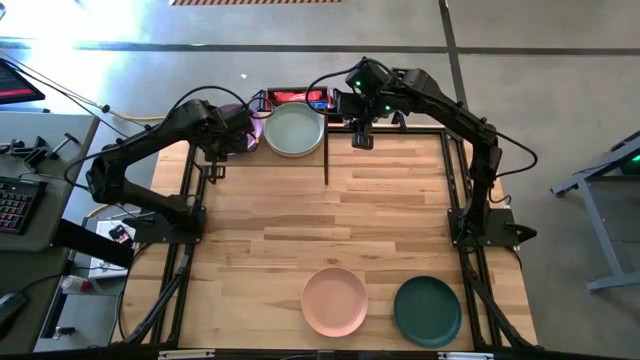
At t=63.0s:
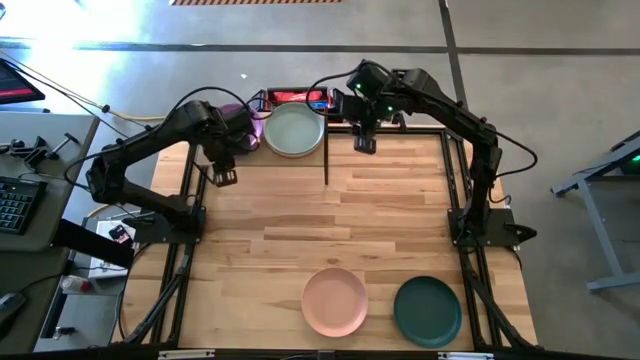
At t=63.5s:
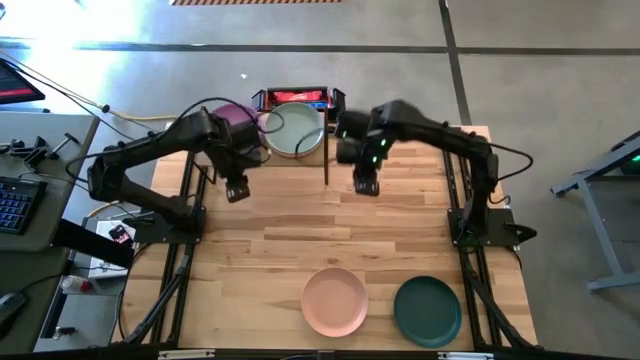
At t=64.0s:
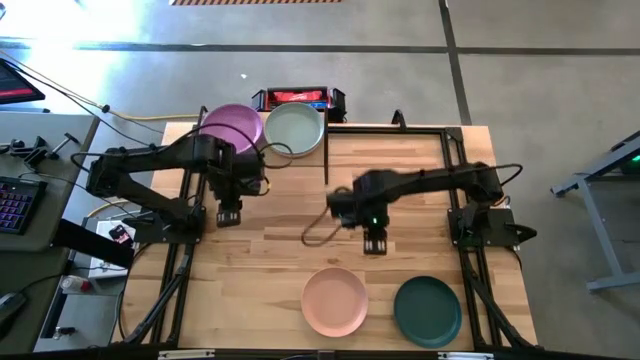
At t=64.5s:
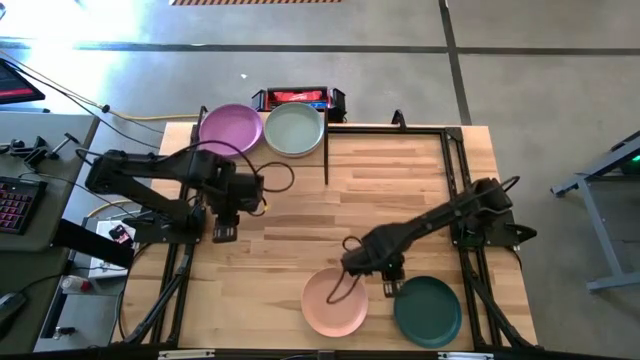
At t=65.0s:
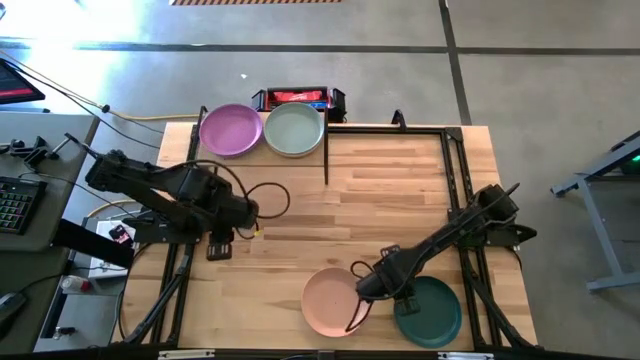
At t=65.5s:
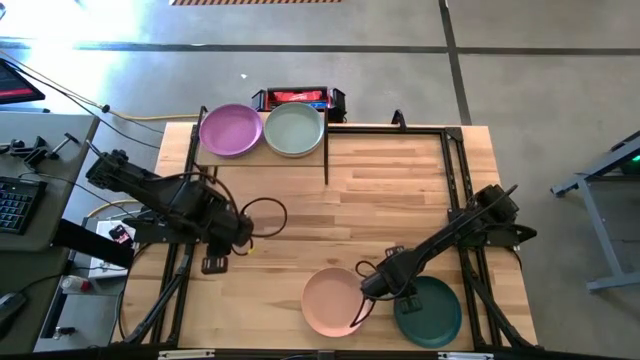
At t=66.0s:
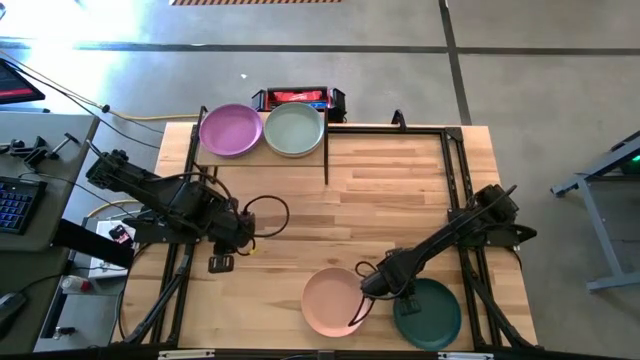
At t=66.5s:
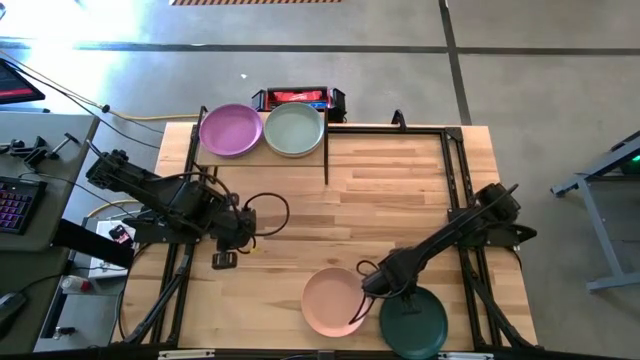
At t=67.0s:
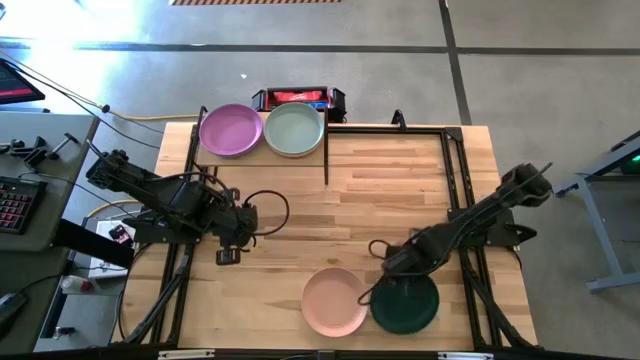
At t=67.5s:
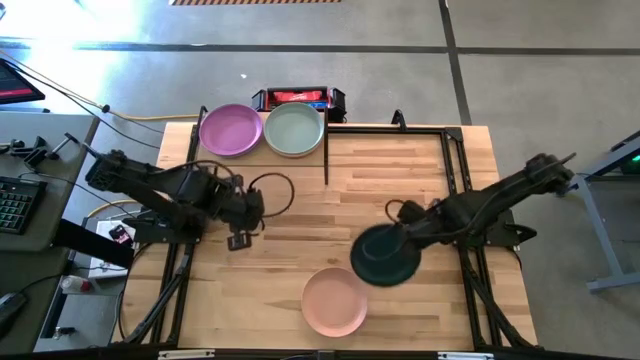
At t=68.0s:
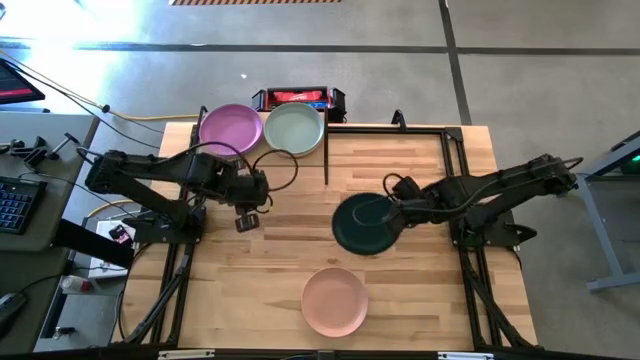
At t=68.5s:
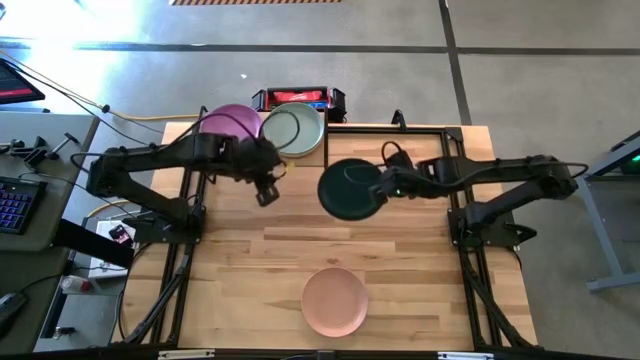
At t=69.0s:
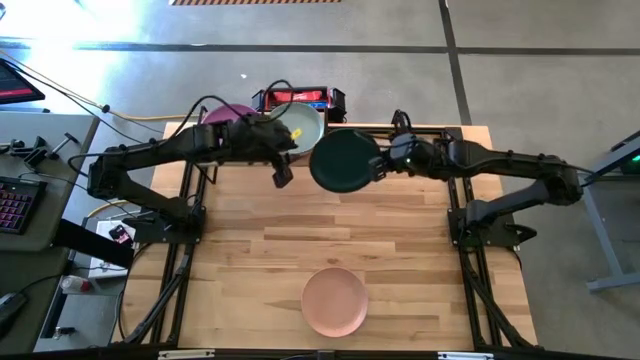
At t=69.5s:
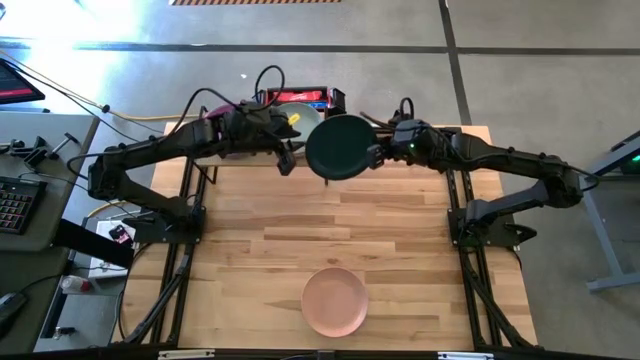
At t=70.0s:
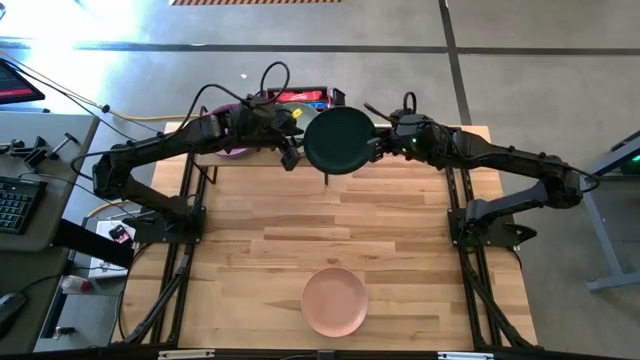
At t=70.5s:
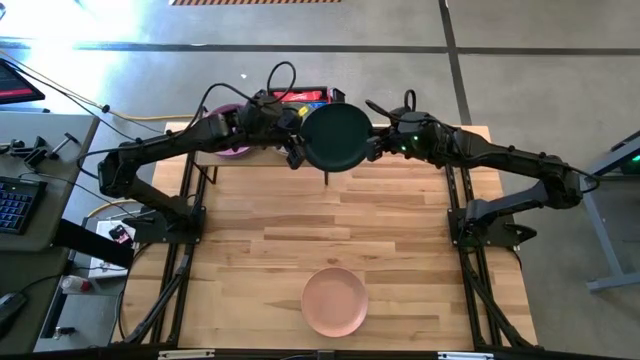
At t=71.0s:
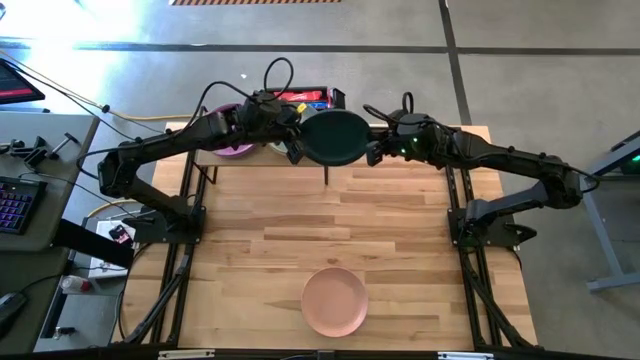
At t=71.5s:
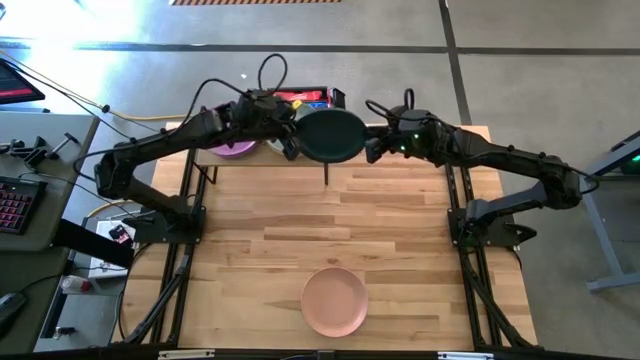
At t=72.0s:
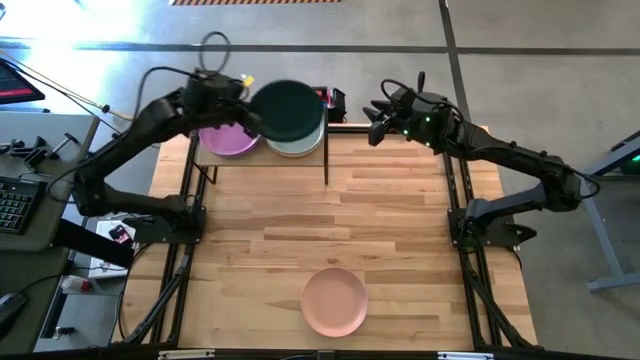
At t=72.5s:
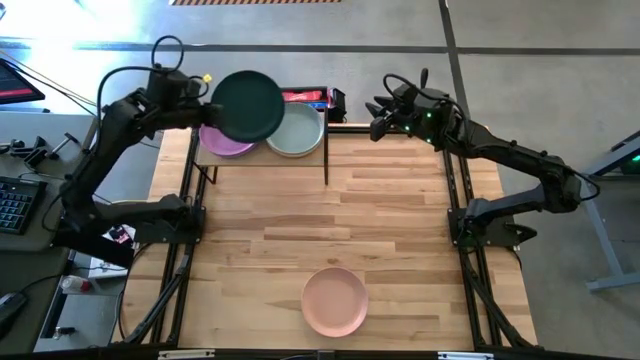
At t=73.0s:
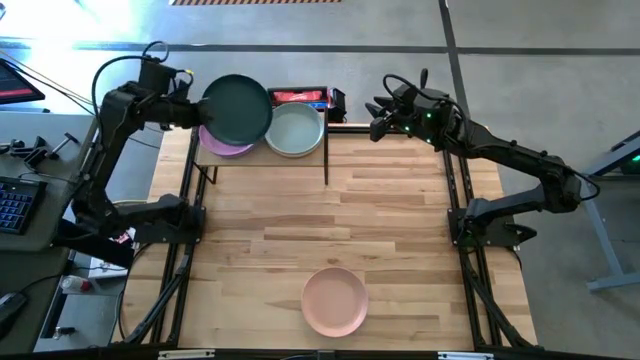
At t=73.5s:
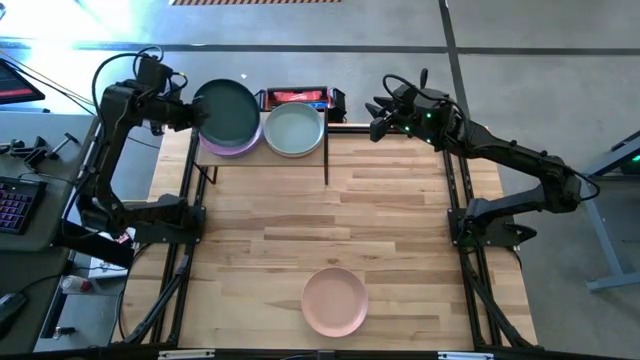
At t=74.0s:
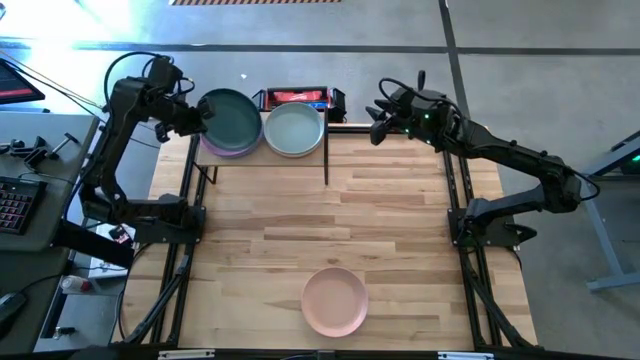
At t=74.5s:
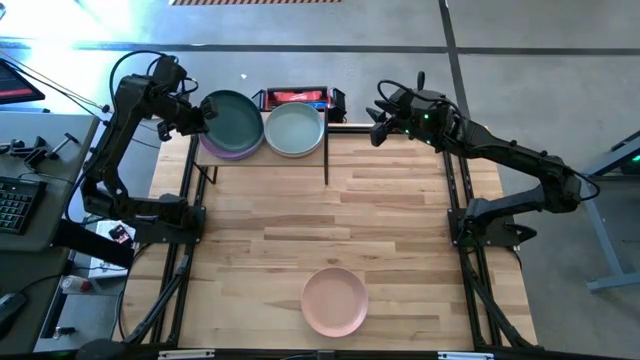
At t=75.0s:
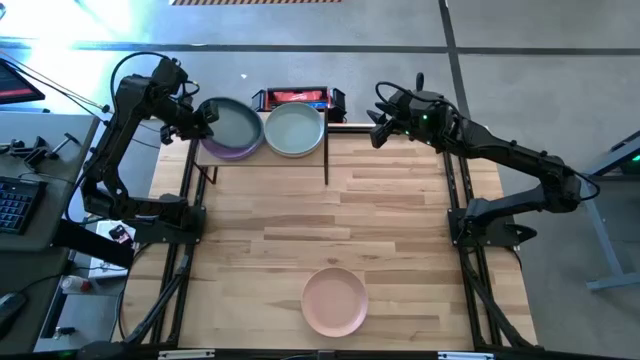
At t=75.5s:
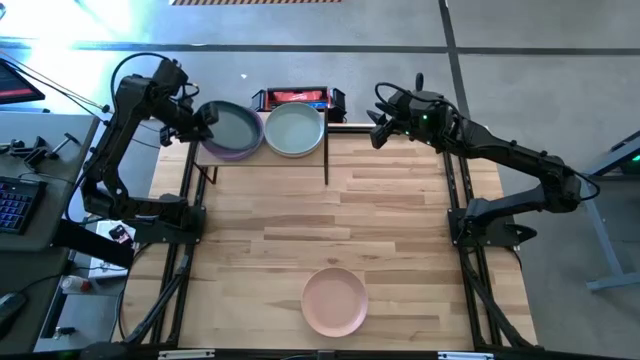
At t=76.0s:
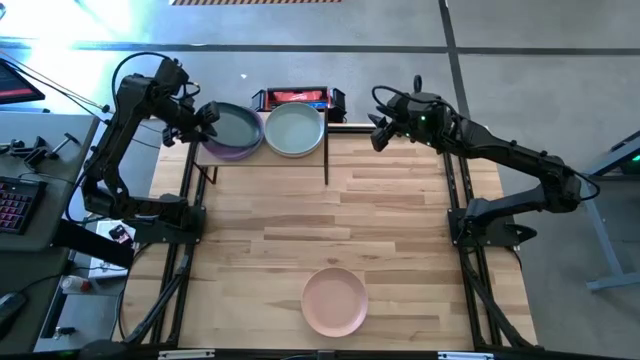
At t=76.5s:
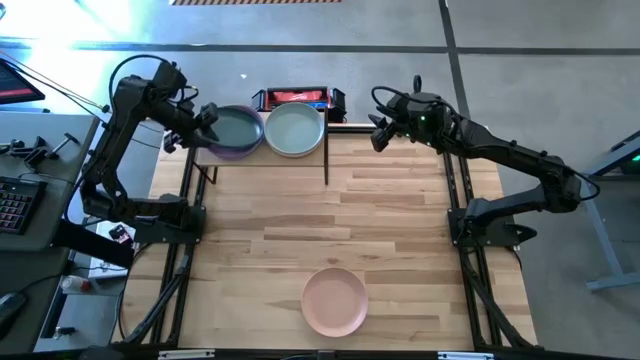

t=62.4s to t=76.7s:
Task: Place and stack plates onto a shelf
Stack the dark green plate on top of the violet plate on the shelf

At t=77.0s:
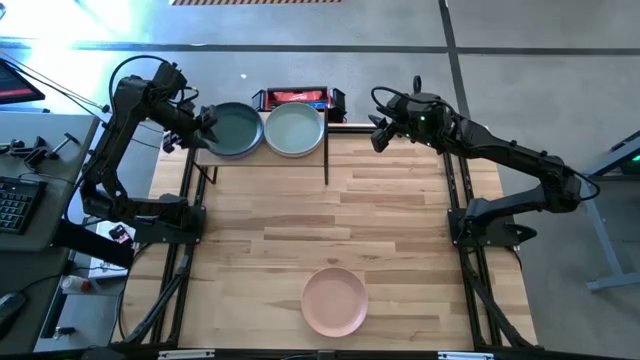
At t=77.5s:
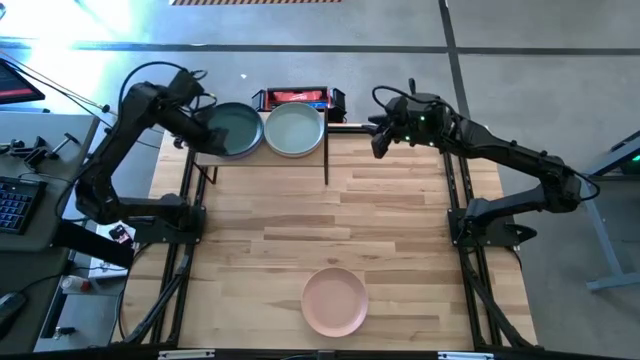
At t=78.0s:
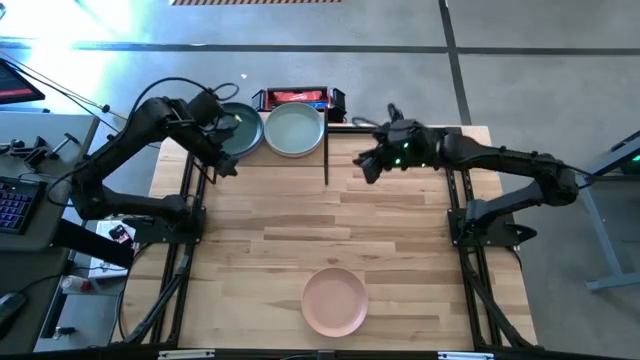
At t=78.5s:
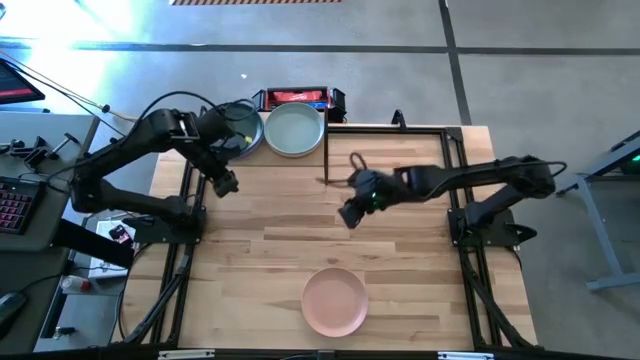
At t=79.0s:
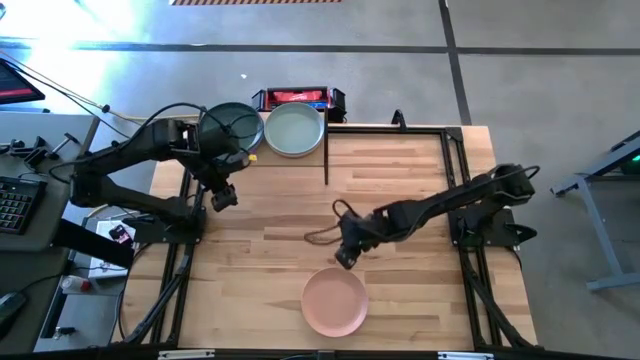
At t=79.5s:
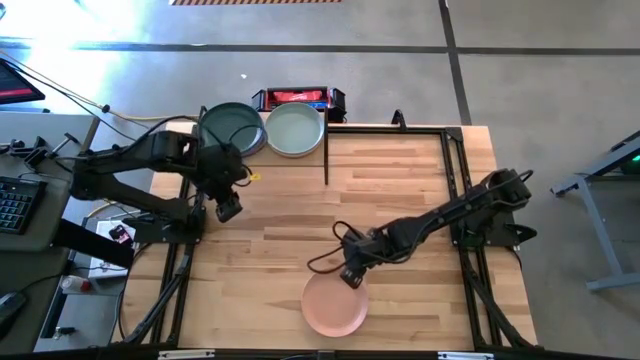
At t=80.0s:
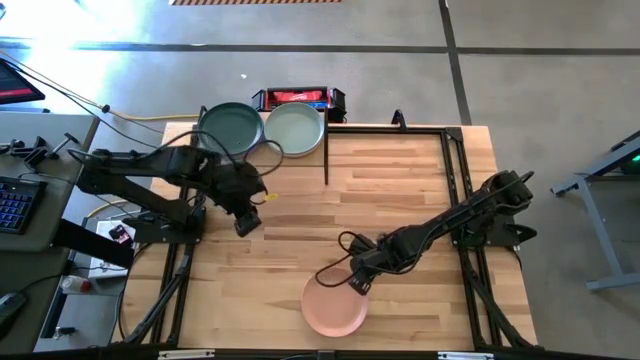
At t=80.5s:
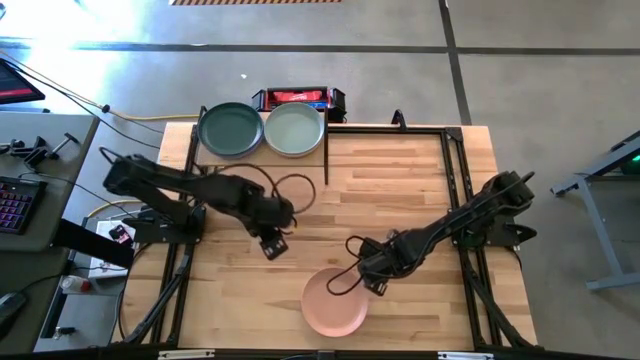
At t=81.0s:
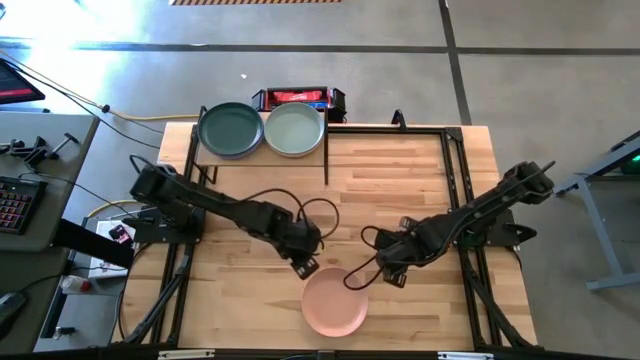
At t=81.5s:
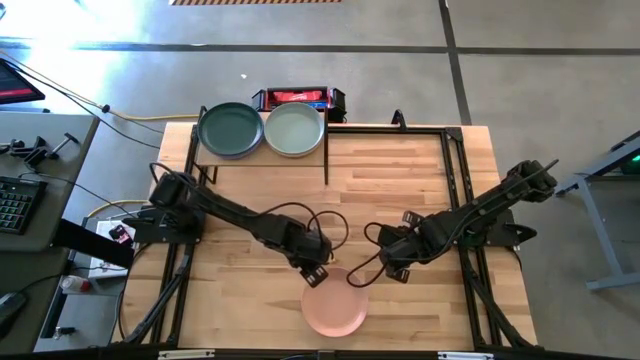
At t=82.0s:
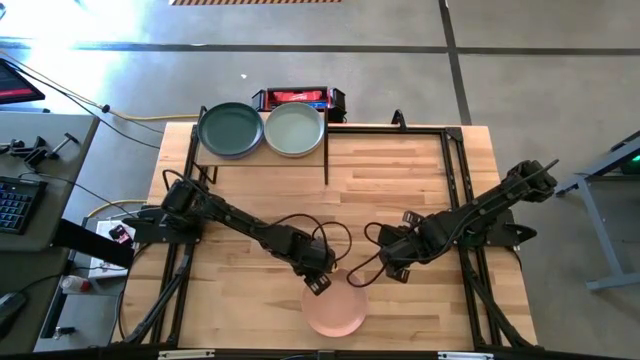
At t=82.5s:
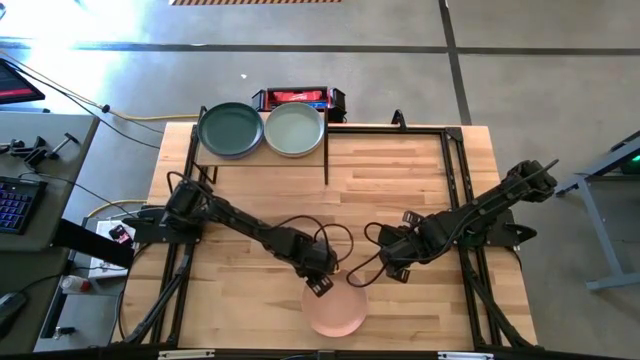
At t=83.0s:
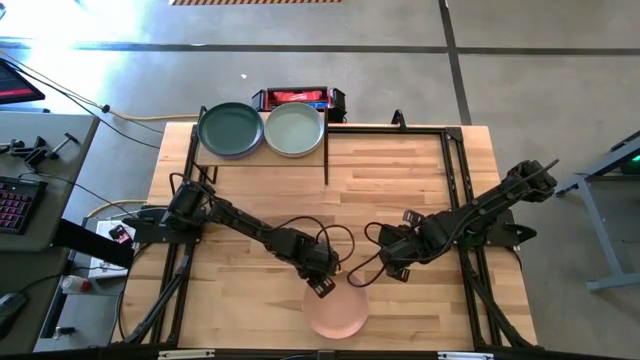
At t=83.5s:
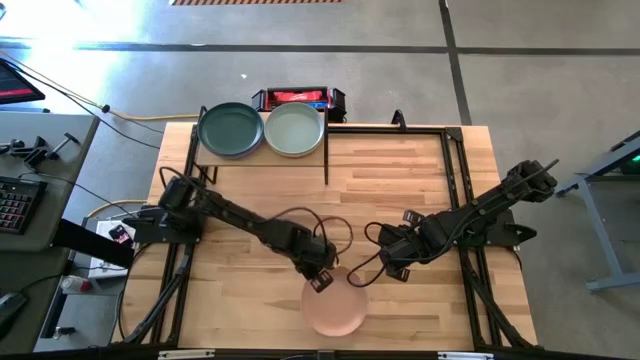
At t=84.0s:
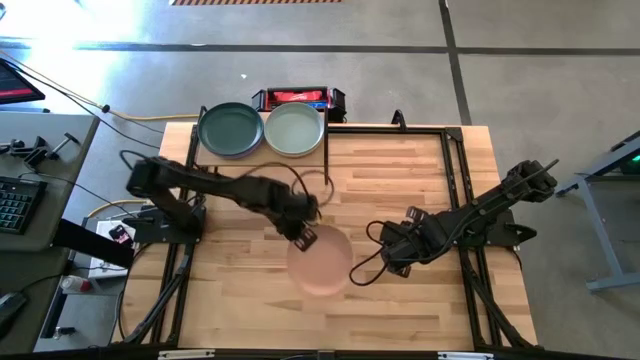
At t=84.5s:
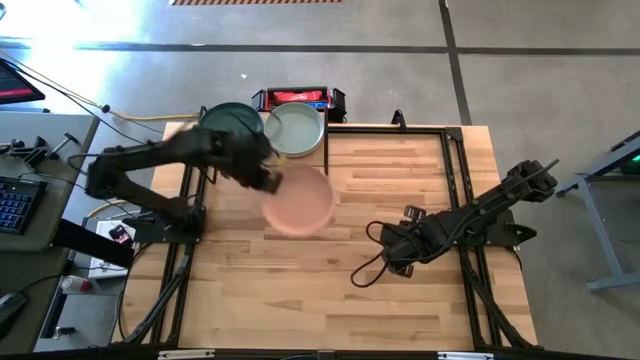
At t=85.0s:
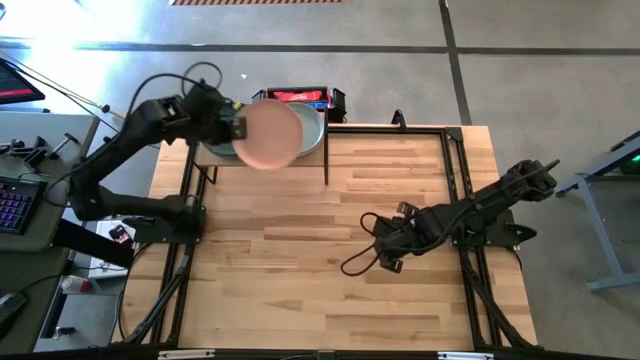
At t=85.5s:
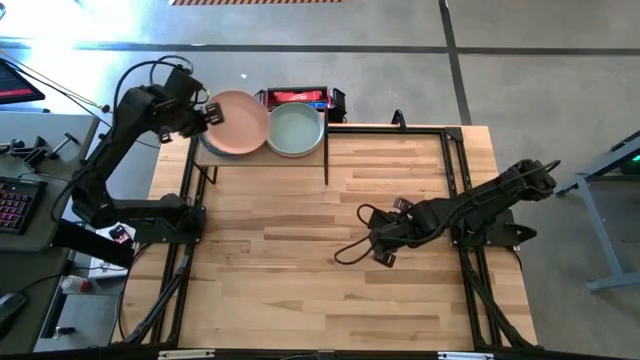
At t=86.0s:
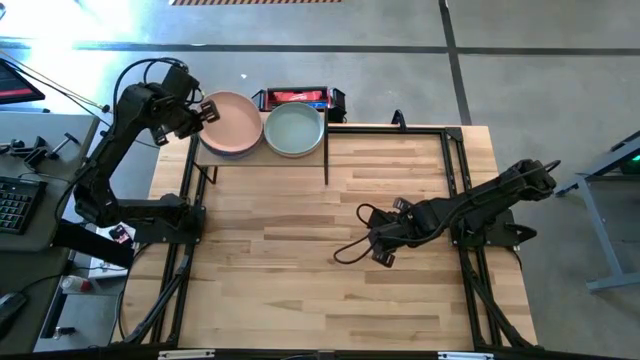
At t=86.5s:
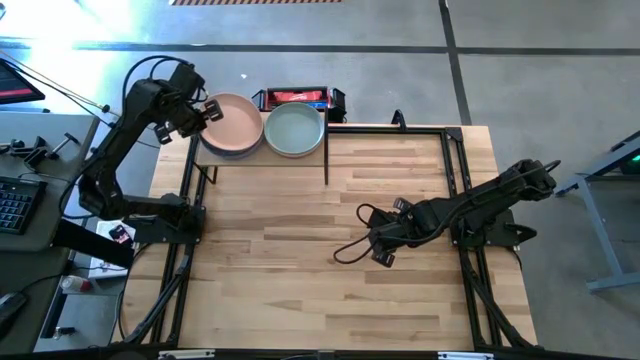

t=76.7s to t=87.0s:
Stack the orange plate on top of the dark green plate on the shelf
